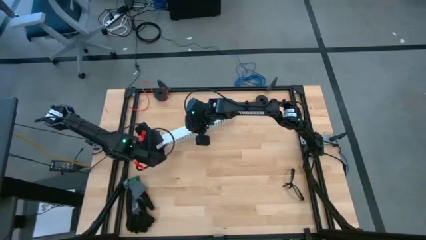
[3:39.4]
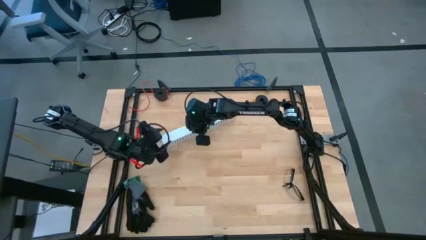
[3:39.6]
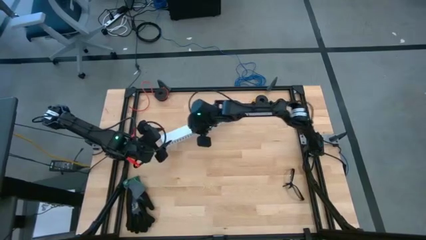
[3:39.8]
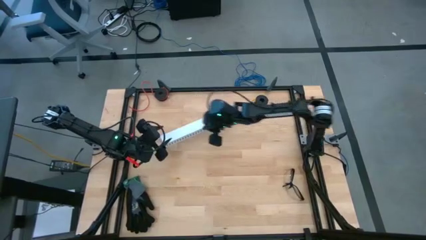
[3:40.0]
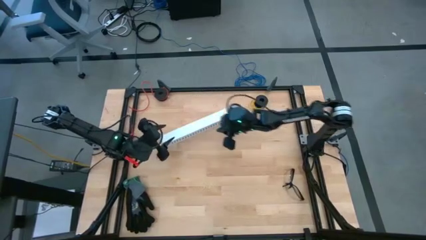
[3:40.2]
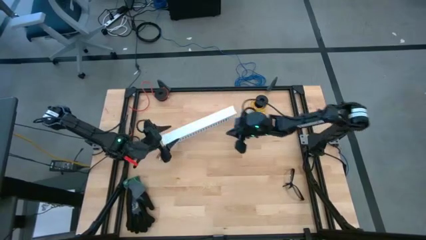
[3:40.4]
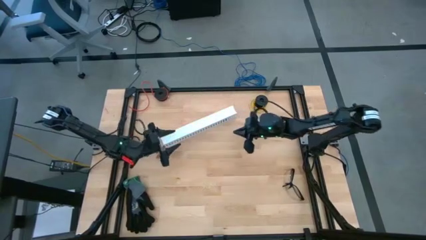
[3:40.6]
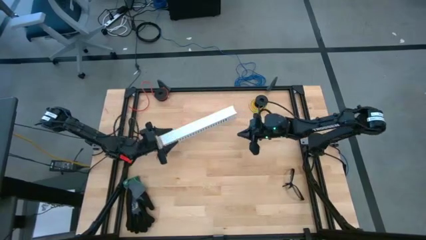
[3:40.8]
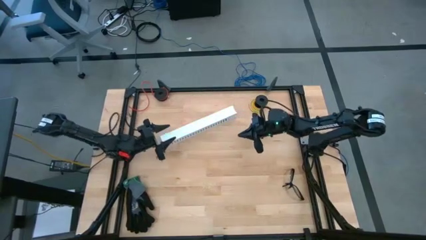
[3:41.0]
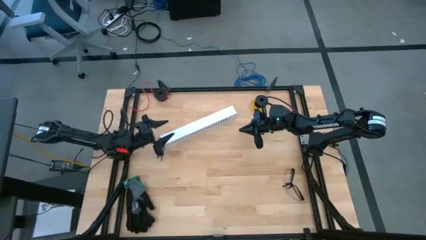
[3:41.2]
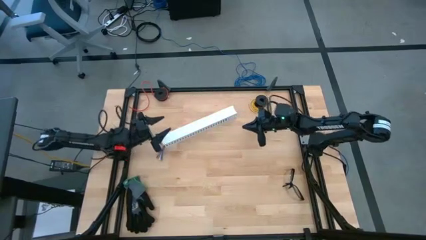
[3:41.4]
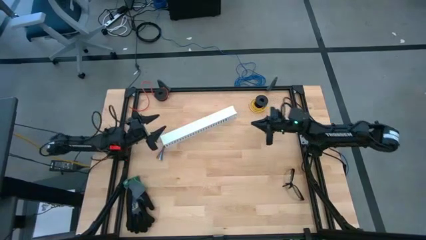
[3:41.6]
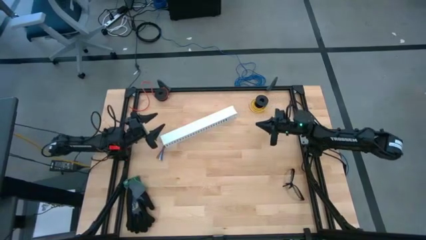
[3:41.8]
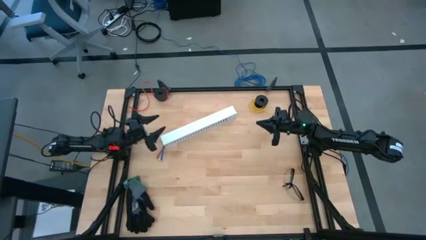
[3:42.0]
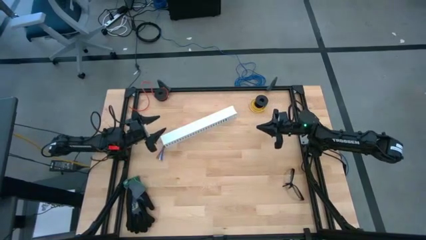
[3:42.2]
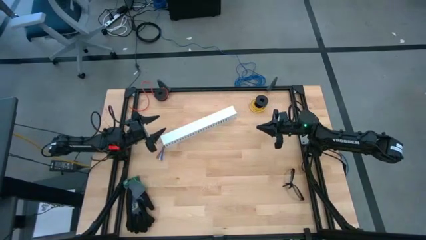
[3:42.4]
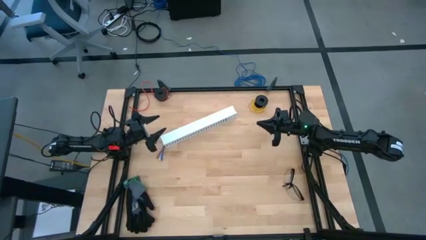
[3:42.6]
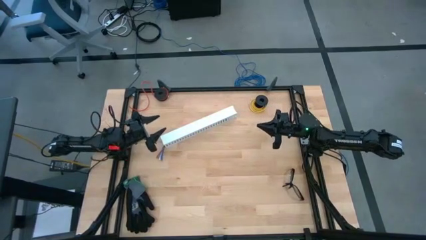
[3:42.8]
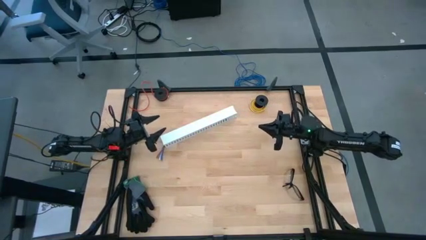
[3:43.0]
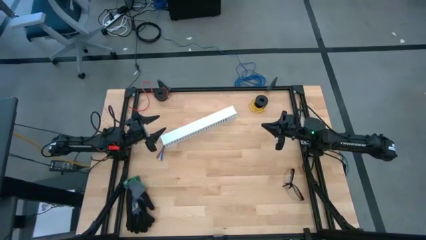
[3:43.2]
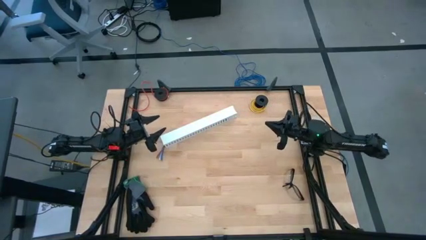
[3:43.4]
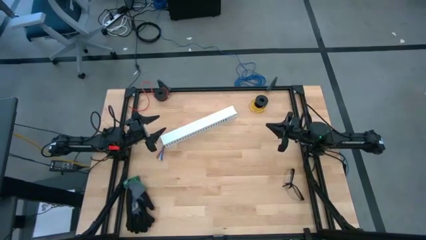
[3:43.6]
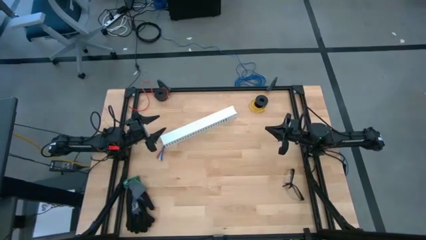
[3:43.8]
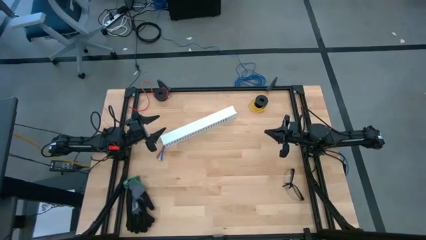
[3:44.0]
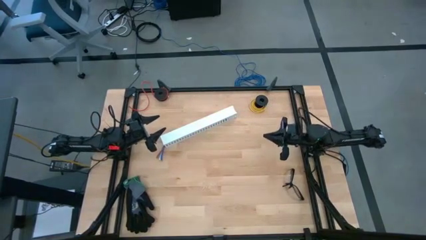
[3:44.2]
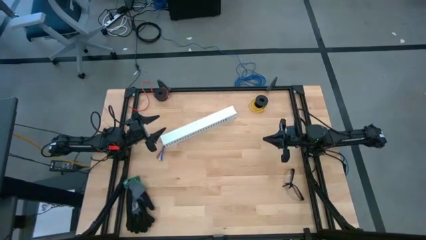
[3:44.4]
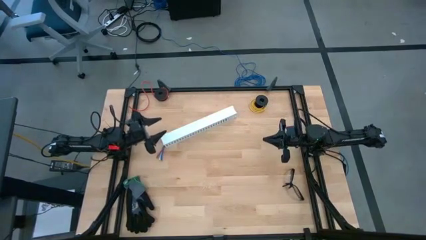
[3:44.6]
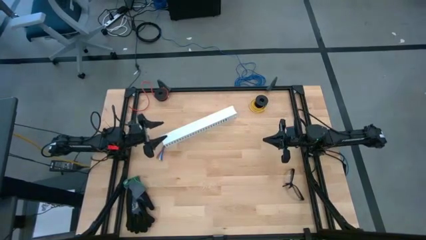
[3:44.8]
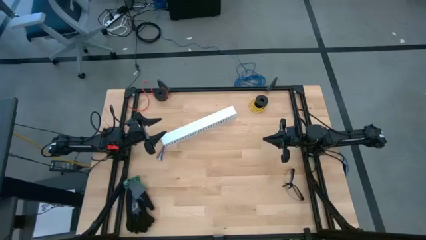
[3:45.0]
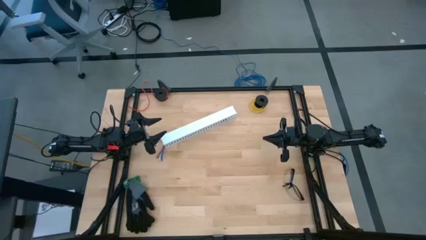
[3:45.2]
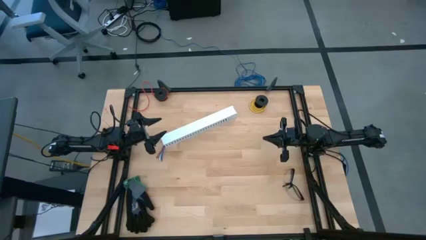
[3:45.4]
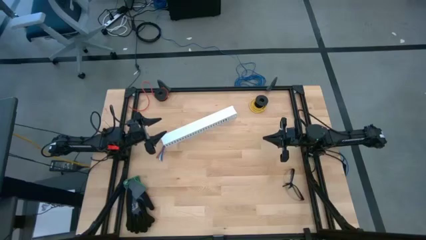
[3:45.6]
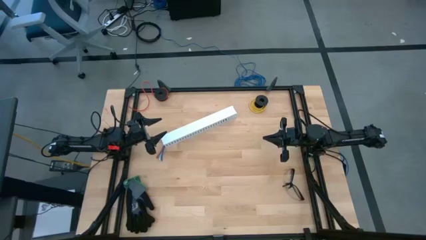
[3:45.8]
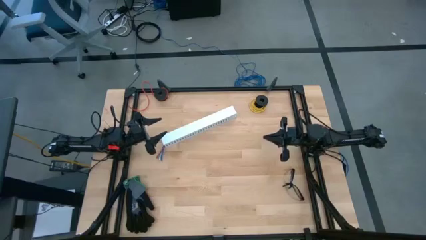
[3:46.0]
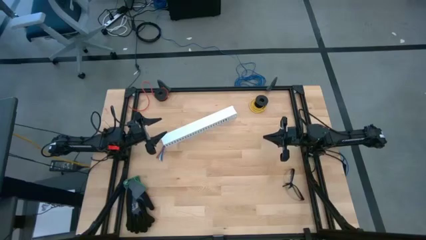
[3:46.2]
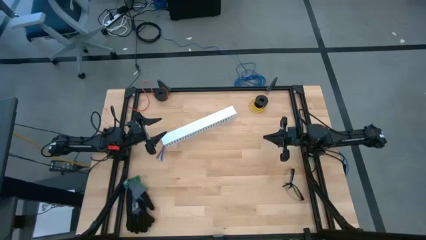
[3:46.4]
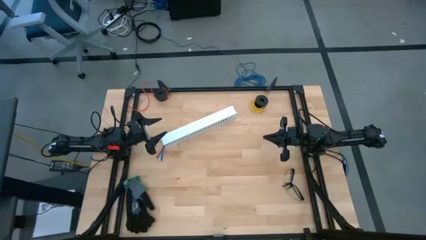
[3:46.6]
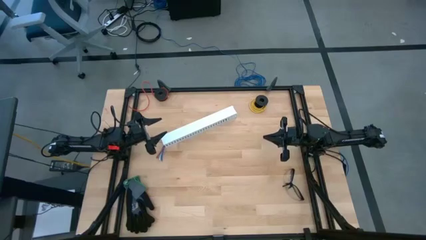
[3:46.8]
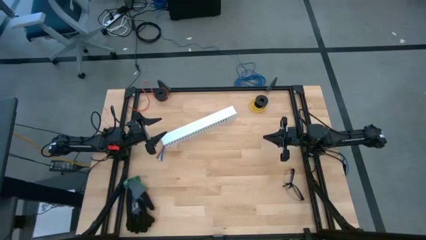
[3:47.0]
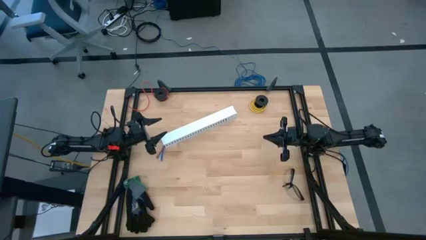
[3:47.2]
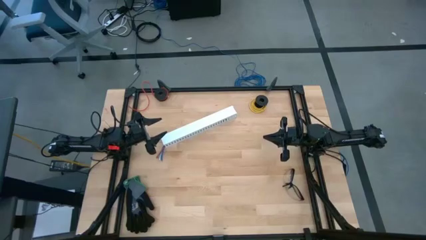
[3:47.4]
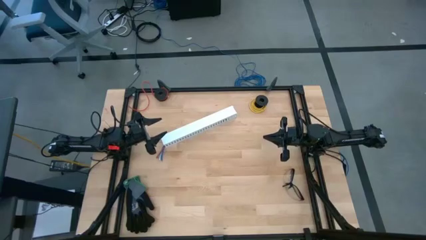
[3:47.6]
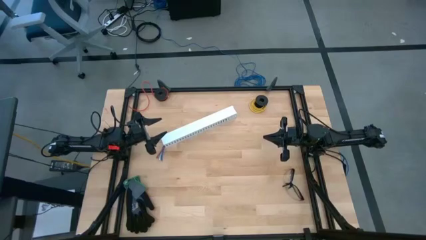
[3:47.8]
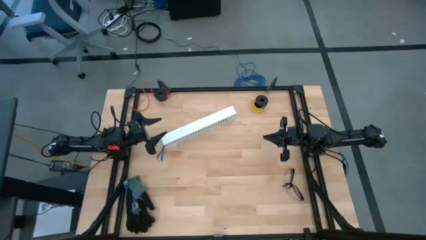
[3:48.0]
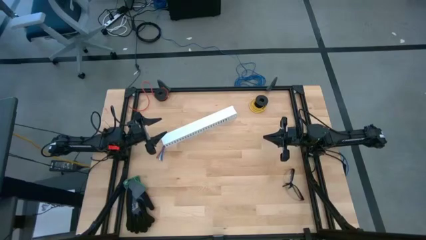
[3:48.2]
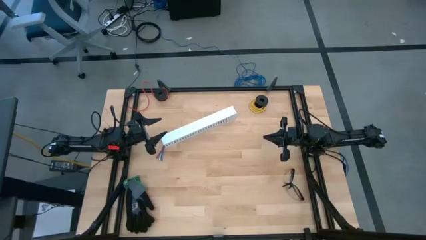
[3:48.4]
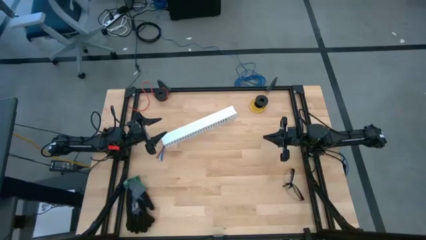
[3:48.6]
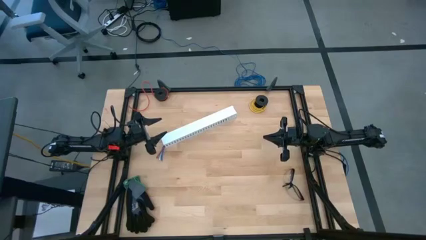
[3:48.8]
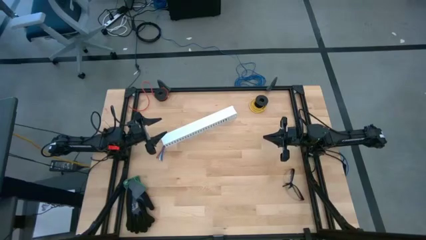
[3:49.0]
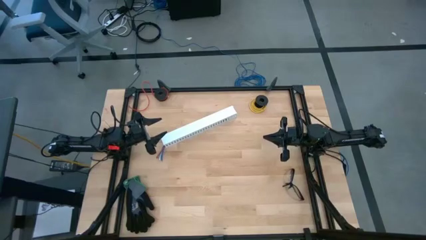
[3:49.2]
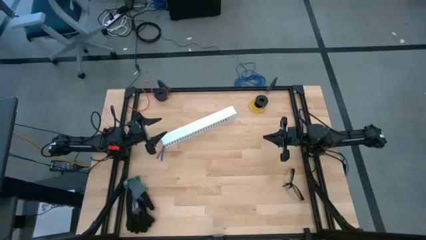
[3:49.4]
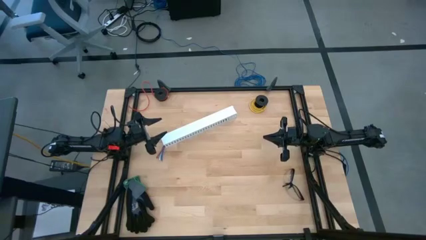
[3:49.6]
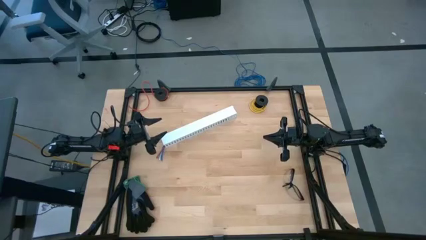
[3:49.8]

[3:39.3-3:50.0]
Task: Ziptie cables
Return to Home Position
